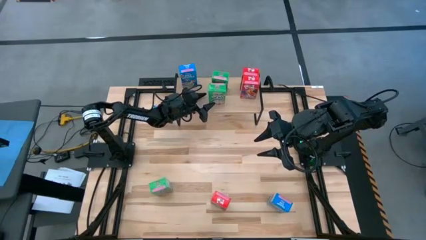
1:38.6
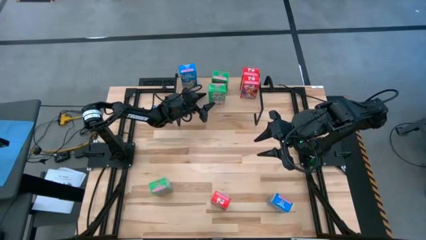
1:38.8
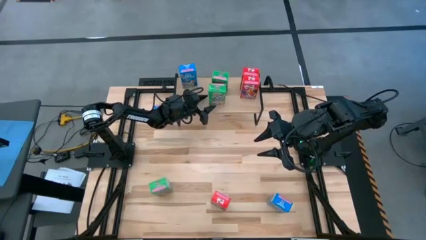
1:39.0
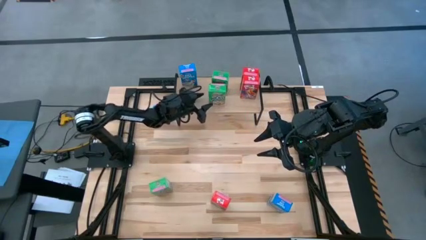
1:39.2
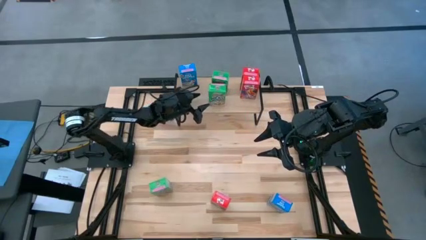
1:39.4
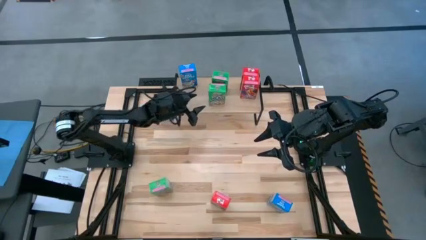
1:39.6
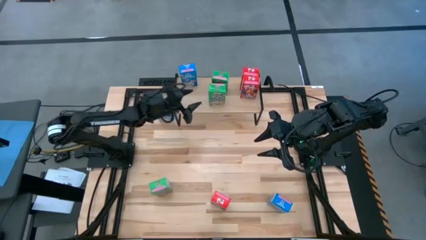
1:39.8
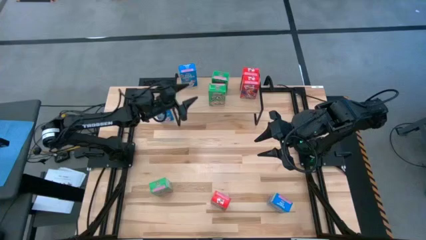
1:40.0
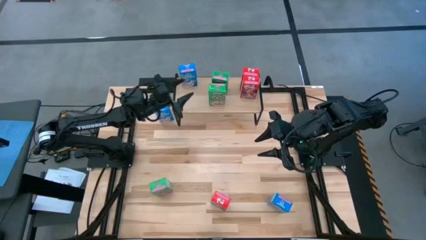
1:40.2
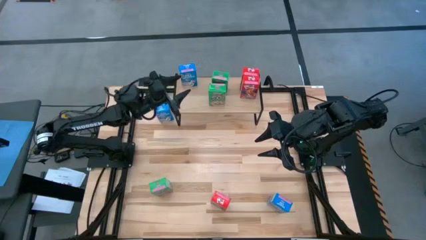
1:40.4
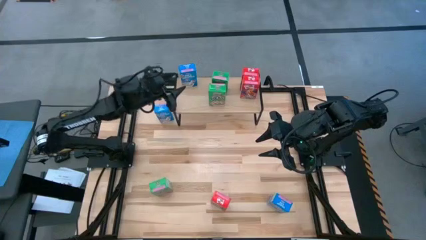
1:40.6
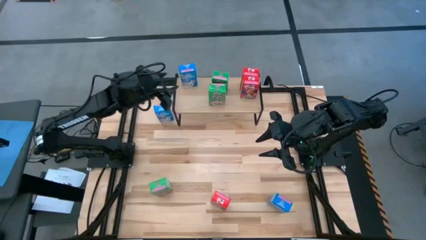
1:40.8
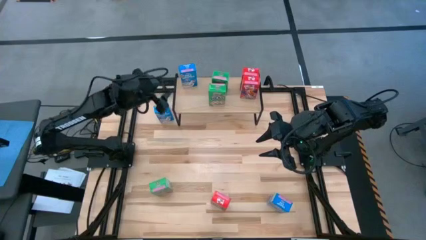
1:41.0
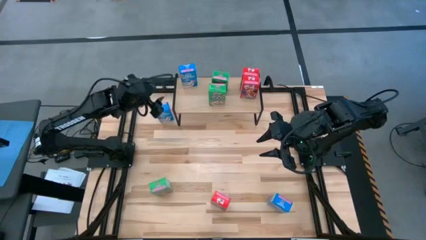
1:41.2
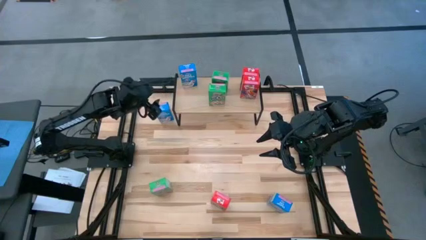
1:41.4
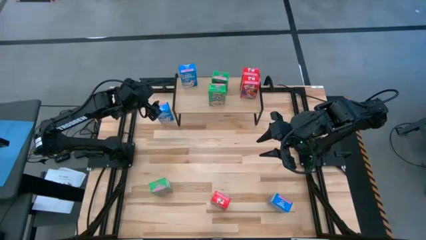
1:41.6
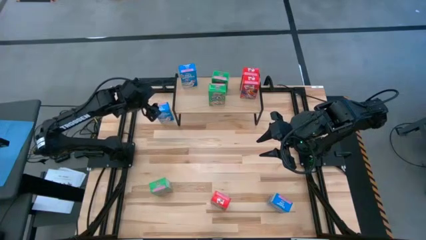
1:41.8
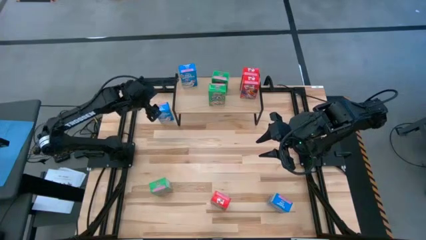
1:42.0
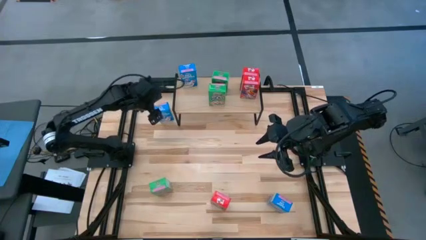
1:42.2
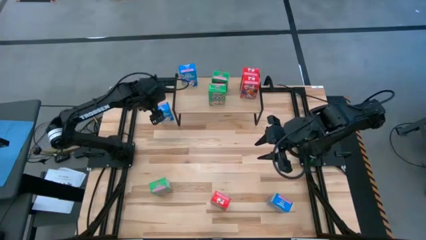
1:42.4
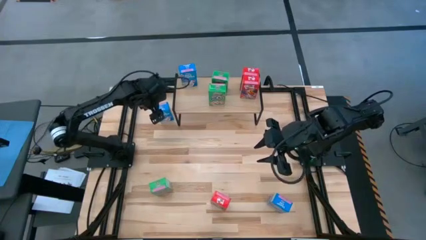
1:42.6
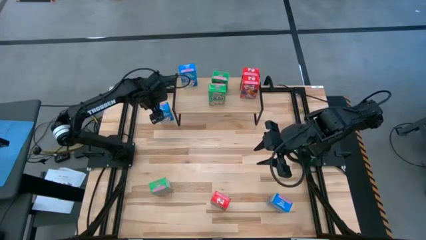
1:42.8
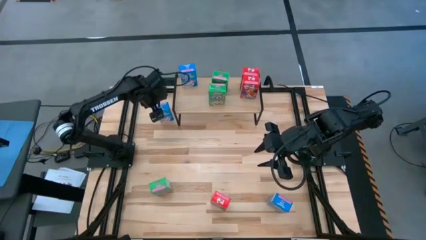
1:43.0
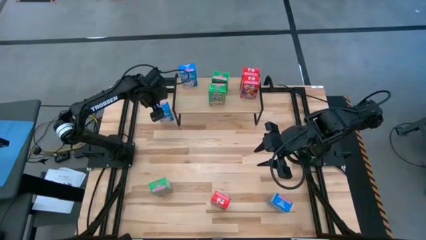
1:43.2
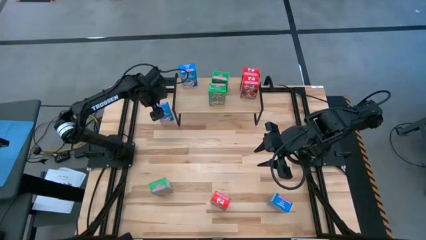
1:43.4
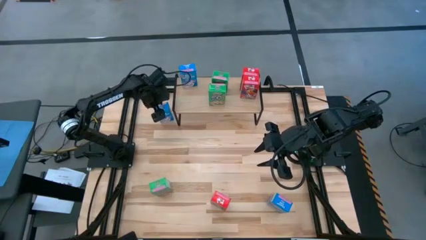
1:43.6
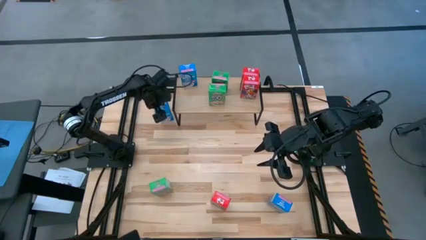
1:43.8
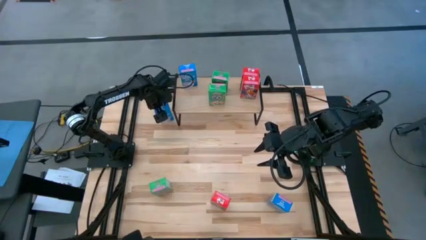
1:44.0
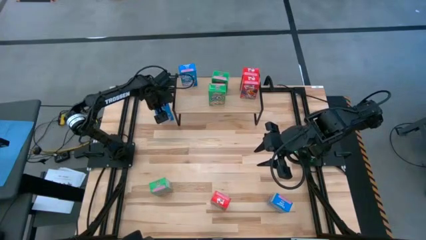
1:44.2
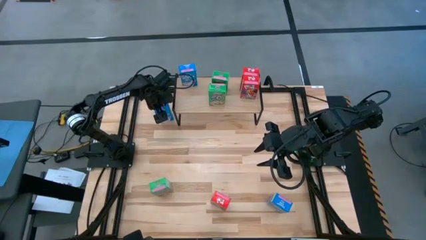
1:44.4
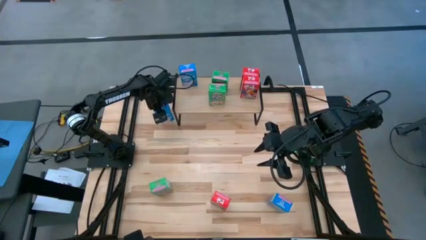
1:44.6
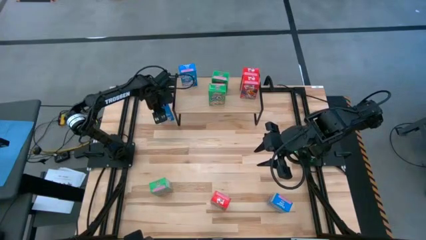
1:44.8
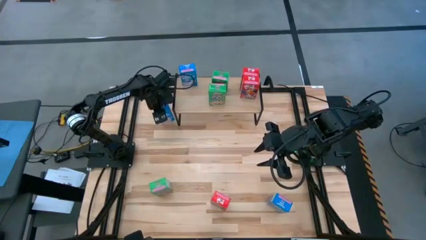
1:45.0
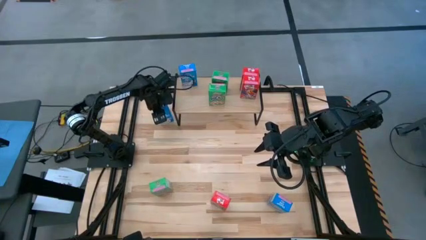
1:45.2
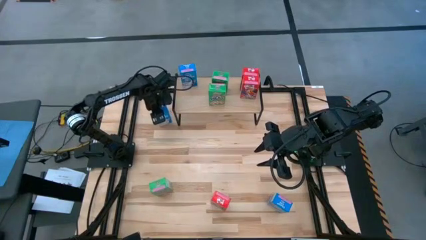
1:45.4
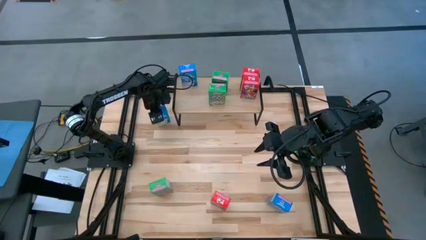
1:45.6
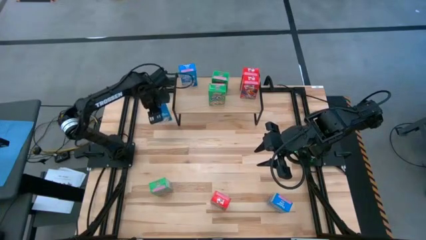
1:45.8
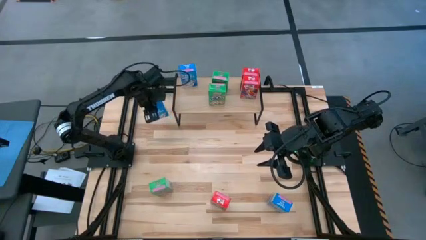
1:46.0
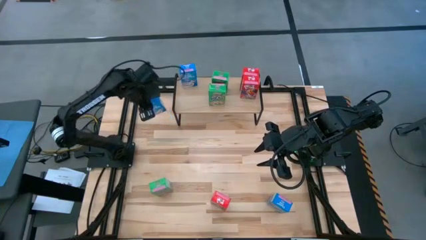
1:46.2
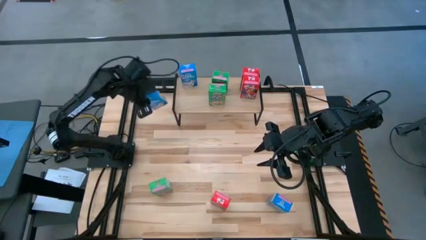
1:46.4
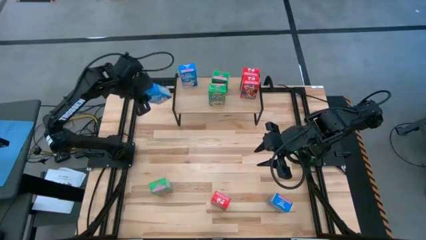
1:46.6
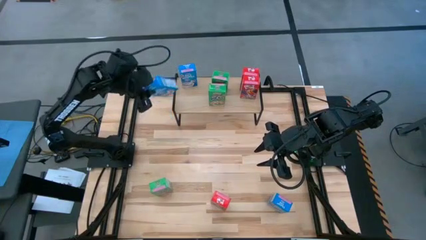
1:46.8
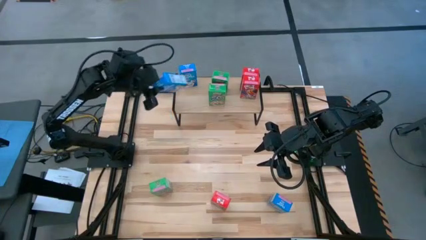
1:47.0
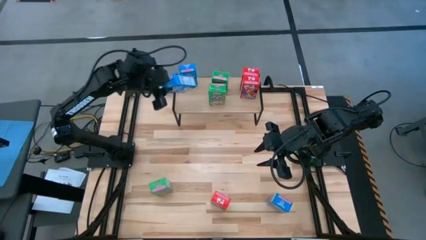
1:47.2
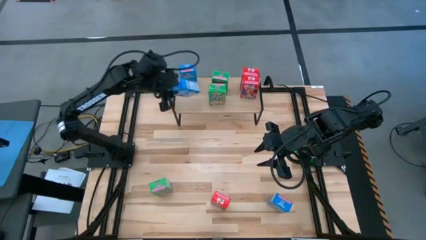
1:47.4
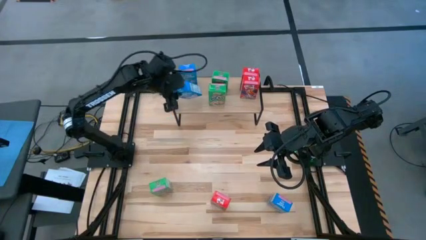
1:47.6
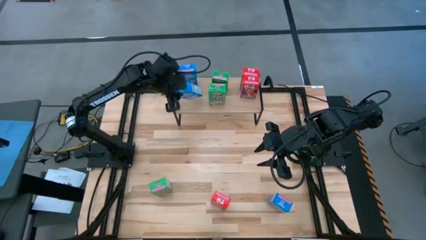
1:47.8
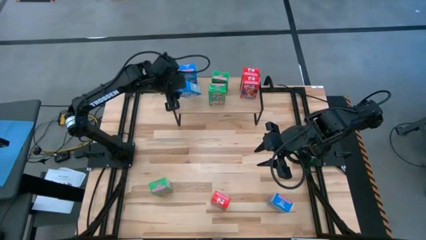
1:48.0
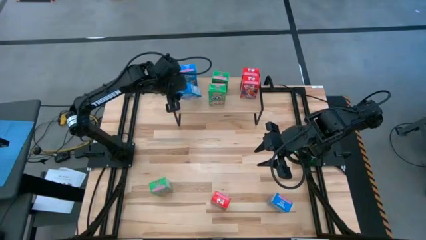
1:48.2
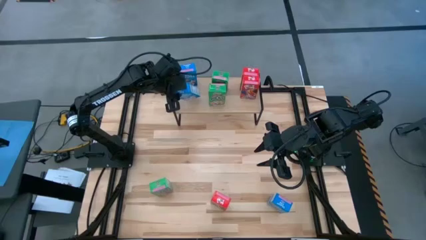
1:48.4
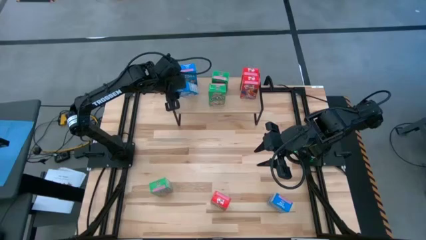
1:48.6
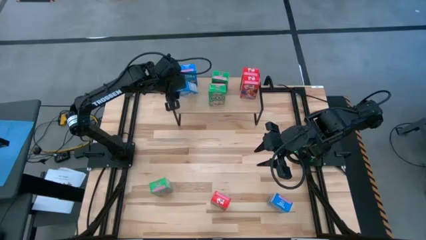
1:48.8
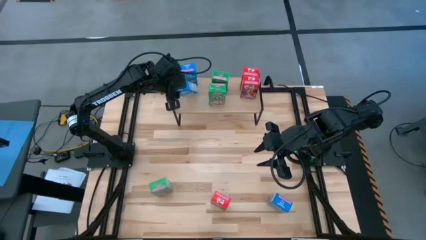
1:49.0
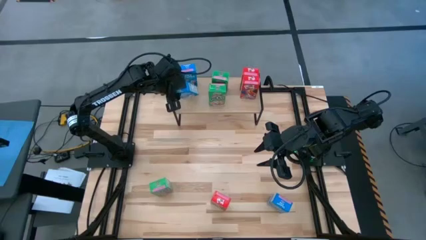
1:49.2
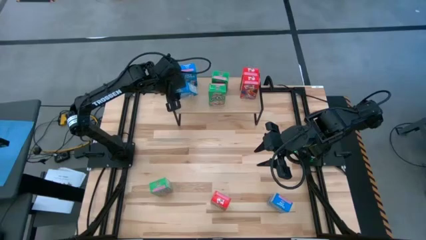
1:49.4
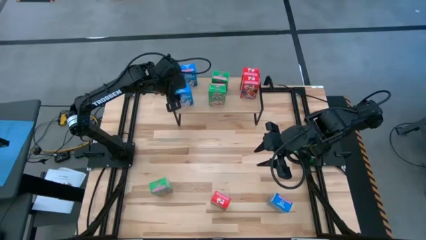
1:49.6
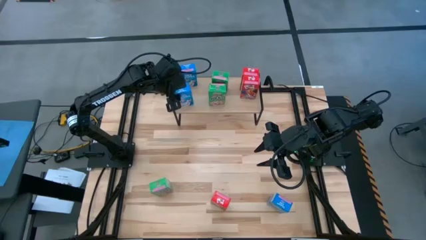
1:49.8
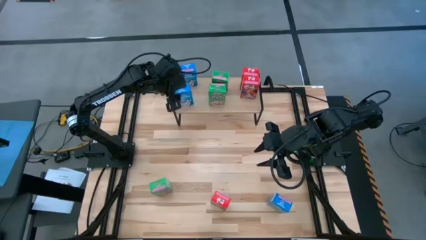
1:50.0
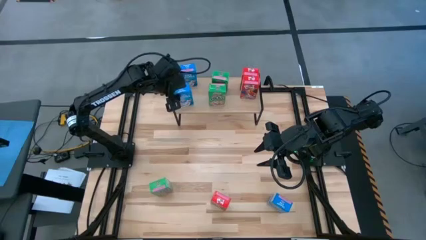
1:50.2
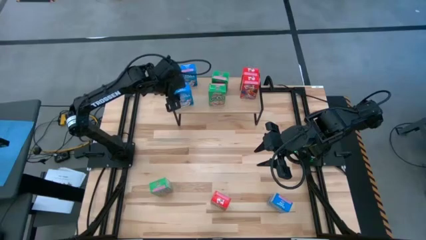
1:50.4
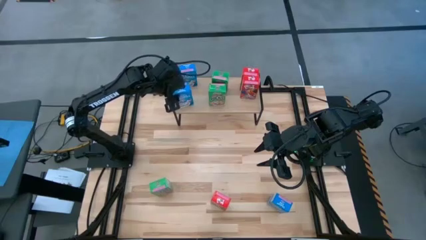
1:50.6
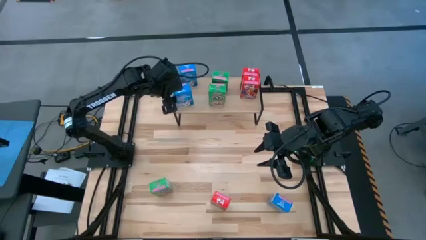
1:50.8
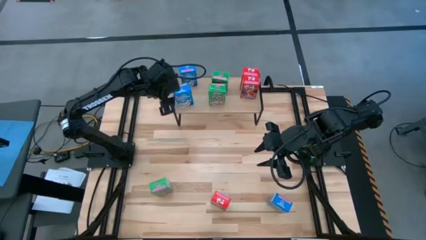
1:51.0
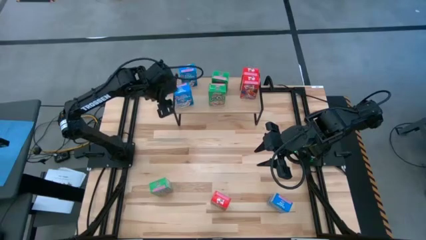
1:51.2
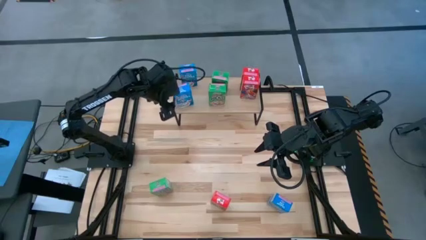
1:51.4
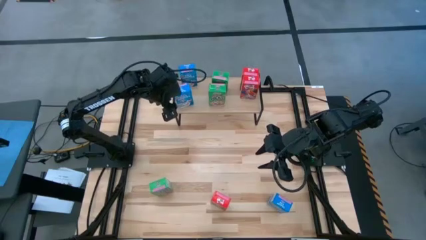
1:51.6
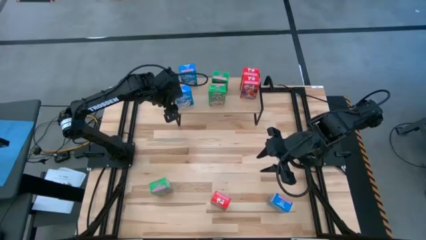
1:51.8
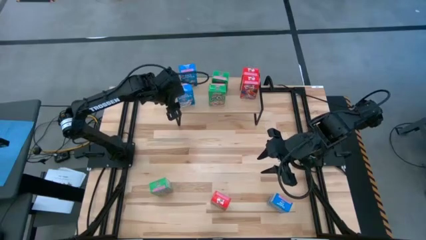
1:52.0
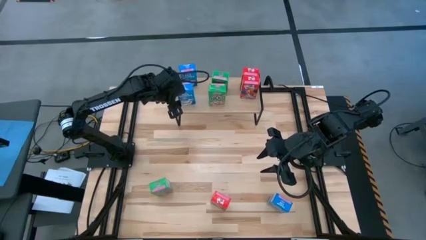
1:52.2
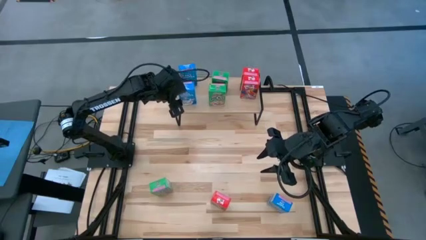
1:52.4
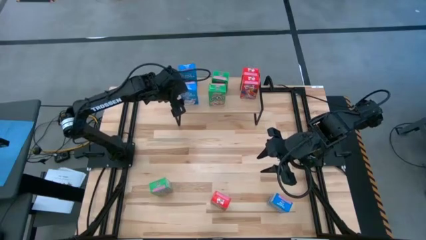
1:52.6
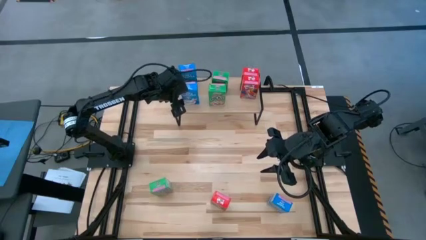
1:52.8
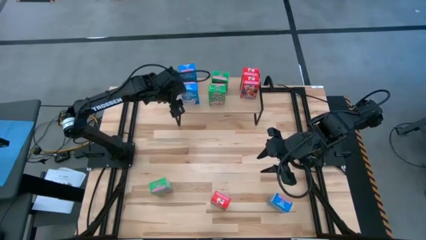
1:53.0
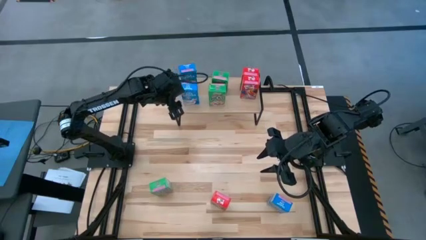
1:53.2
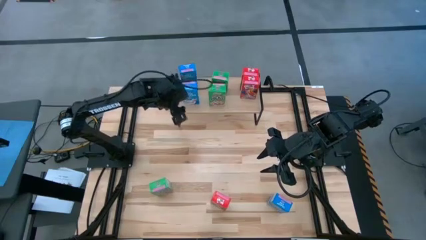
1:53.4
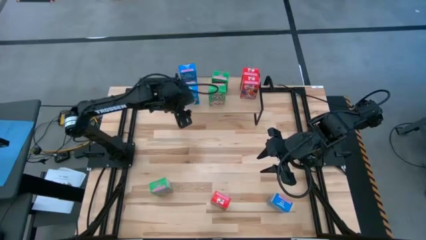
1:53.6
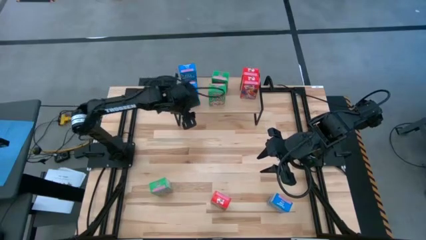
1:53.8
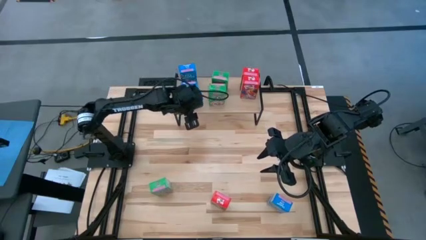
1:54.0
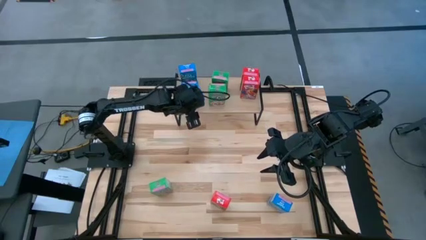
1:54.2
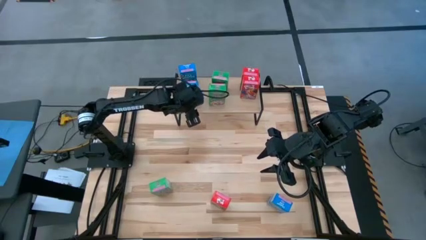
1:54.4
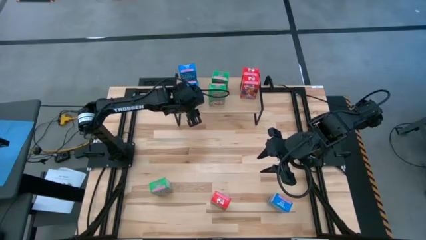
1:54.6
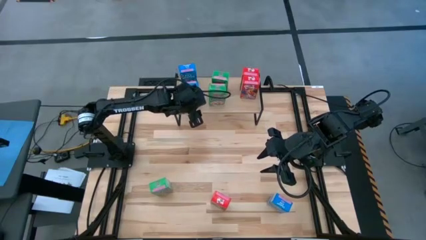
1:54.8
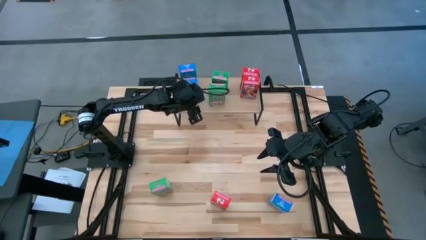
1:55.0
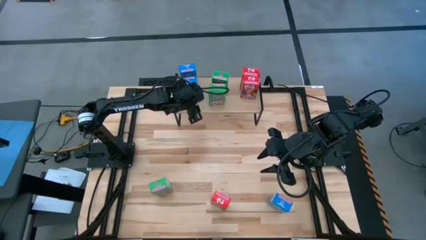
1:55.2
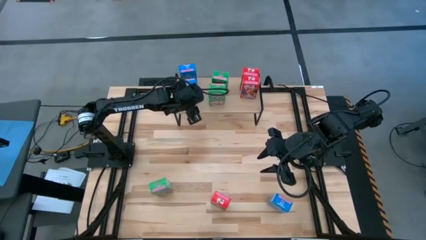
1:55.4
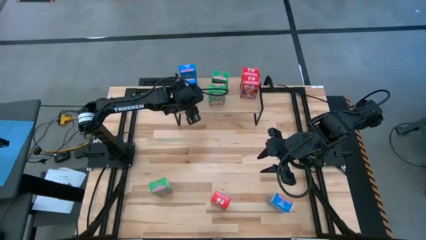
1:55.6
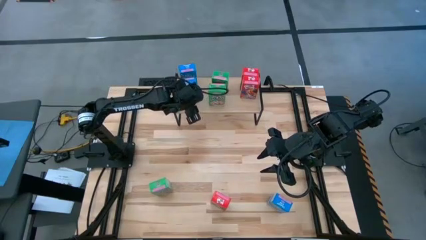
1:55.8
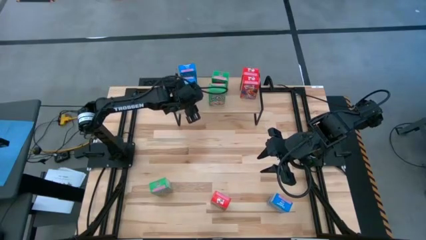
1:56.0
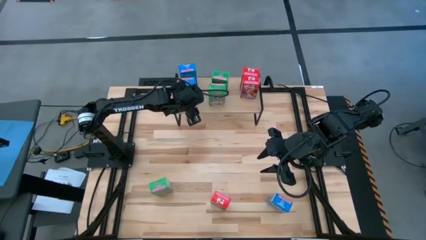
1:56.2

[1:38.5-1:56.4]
Task: Stack cereal on shelf
Put the top left blue cereal box on the shelf aligned with the other blue cereal box
